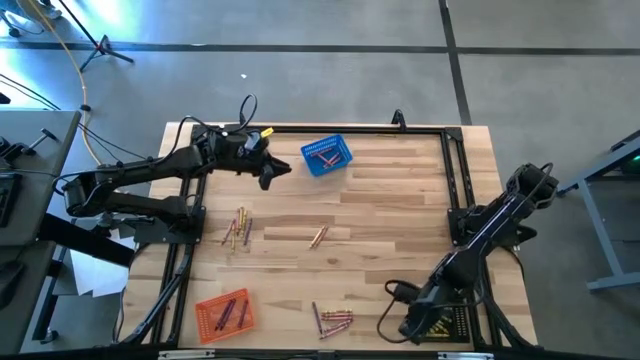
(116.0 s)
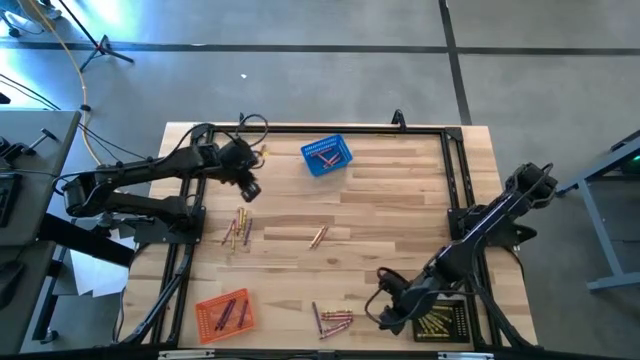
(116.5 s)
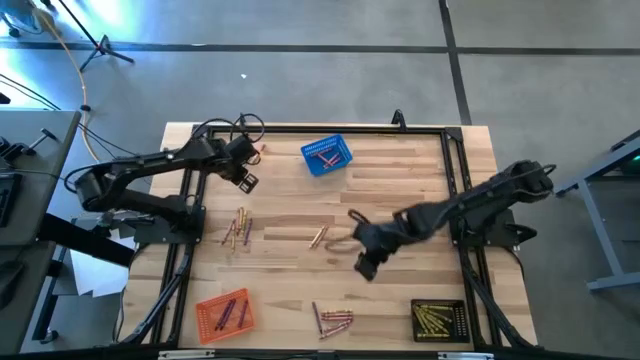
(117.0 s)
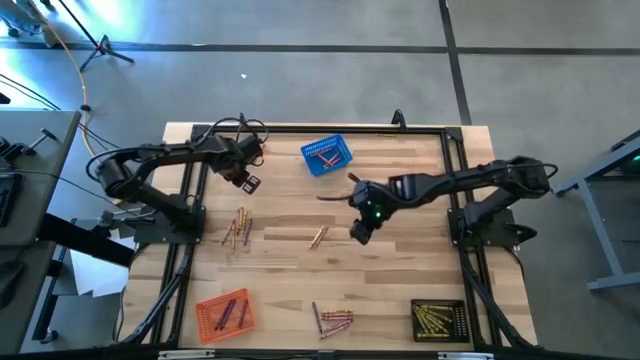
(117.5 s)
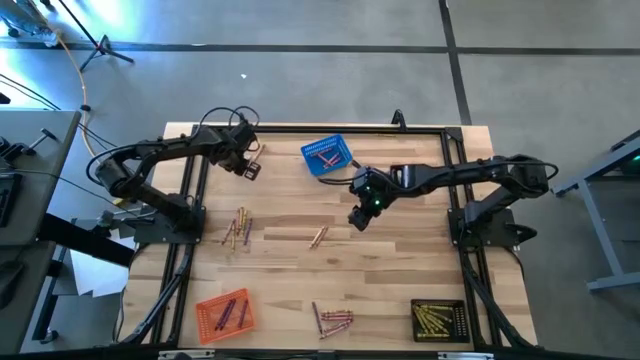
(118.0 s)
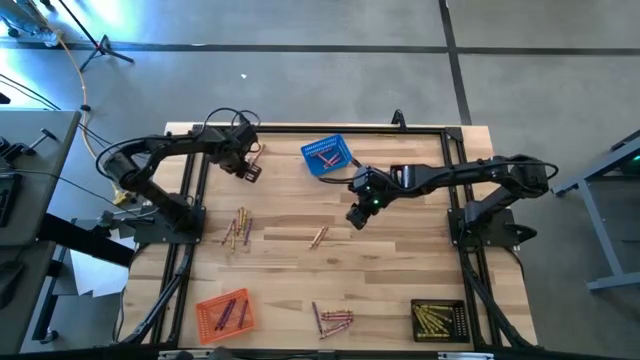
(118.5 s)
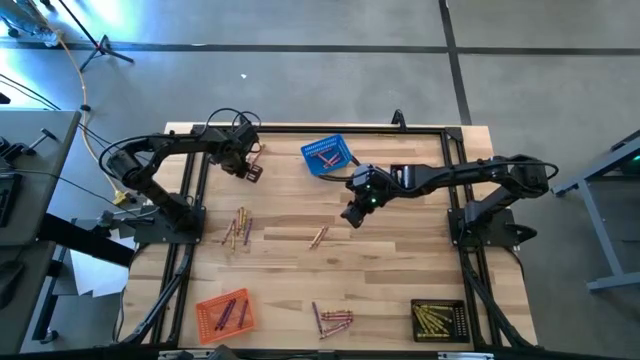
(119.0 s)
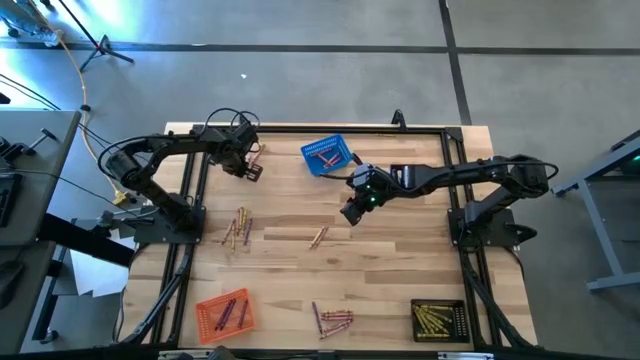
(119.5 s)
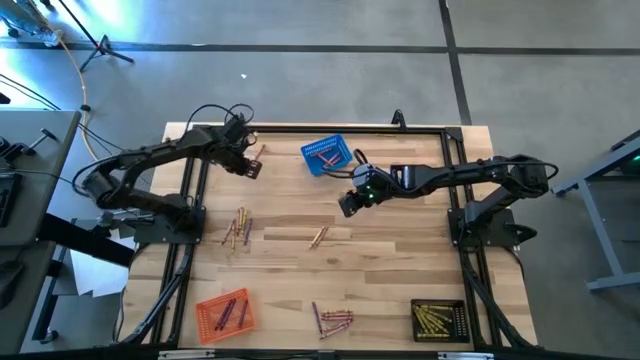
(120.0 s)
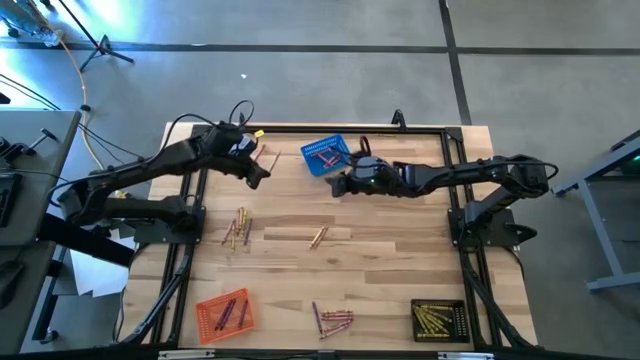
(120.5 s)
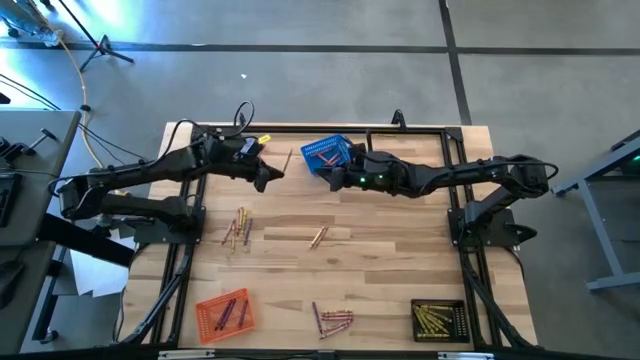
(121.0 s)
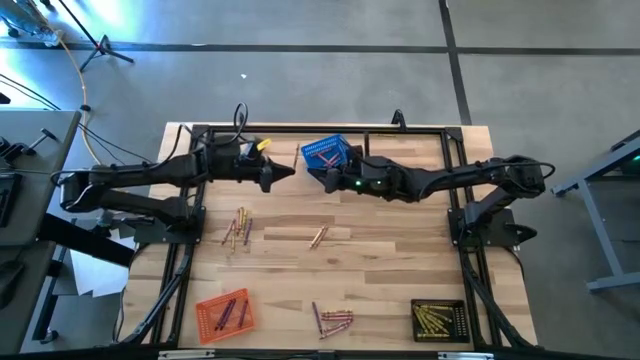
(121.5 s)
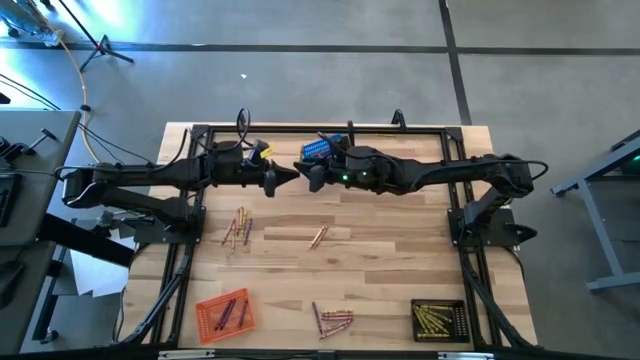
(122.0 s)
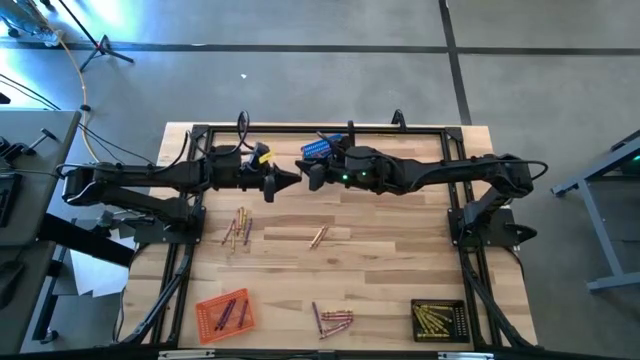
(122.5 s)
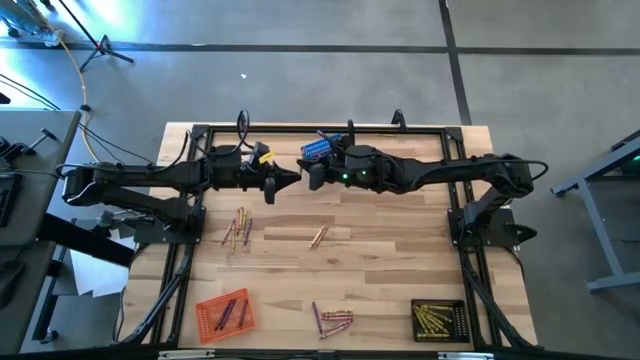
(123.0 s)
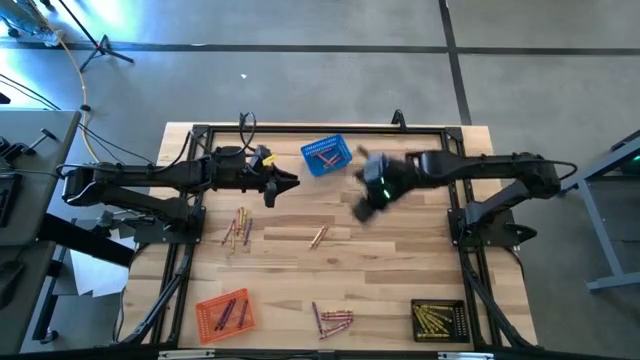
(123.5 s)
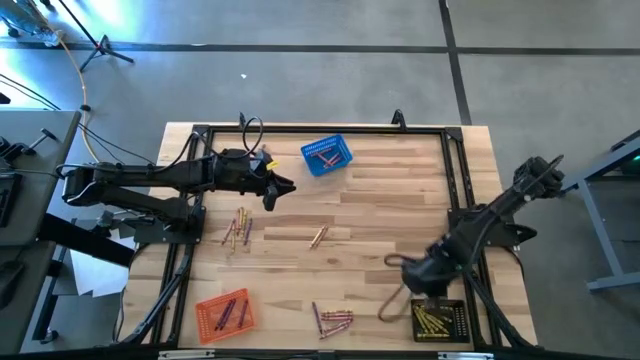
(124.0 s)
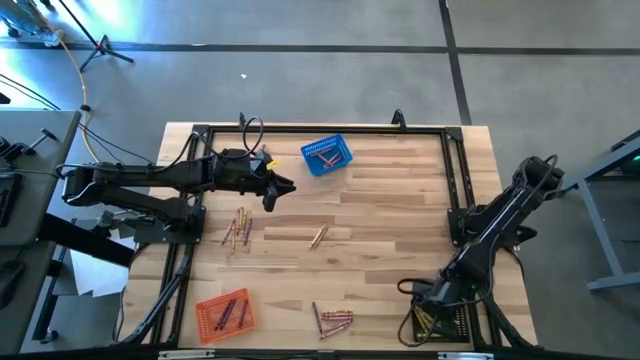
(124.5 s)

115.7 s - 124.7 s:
Task: Sort crayons
Put the yellow crayon into the black bin

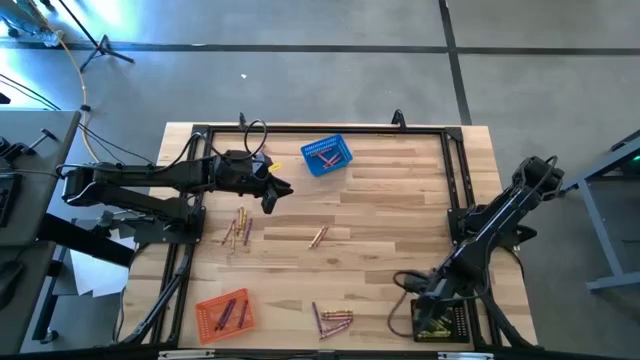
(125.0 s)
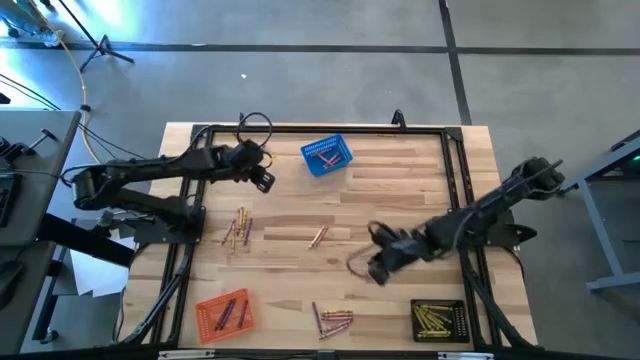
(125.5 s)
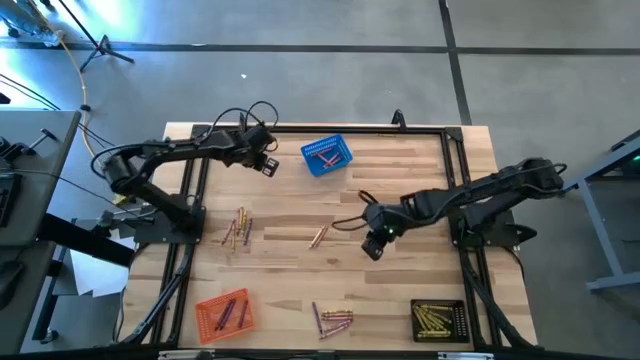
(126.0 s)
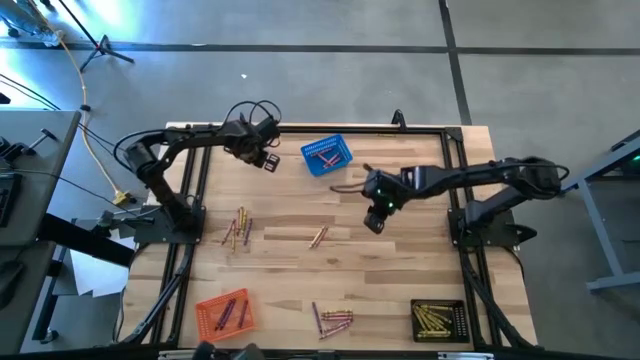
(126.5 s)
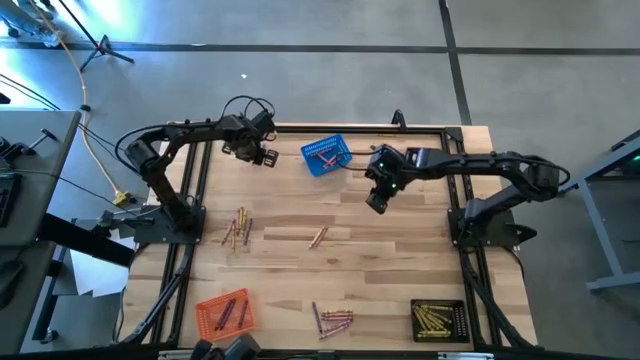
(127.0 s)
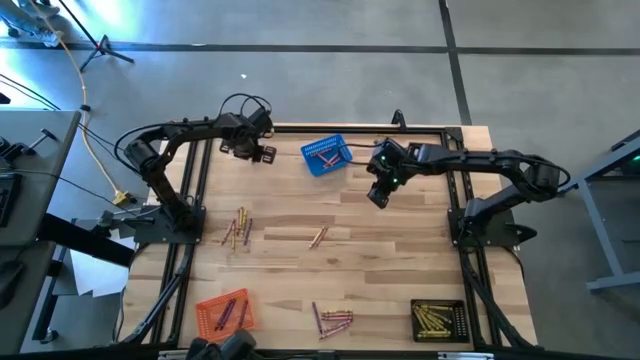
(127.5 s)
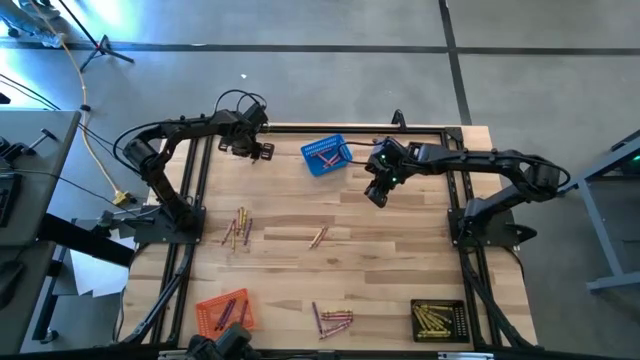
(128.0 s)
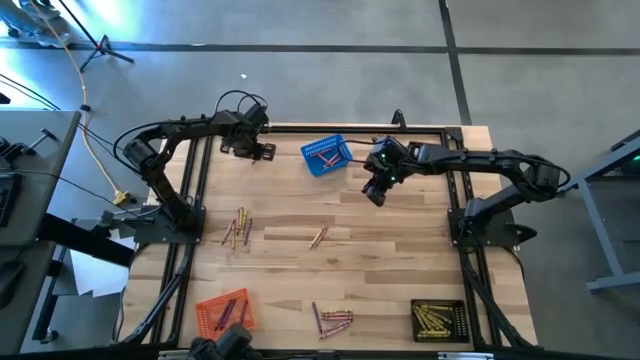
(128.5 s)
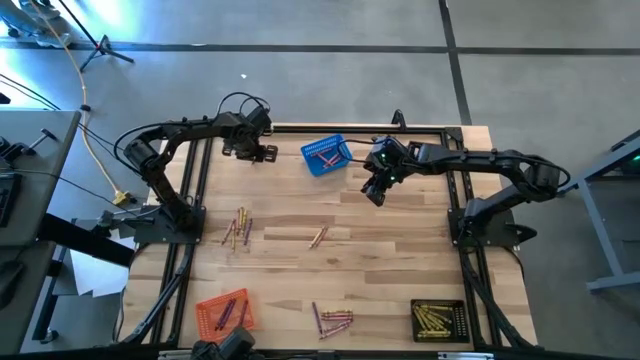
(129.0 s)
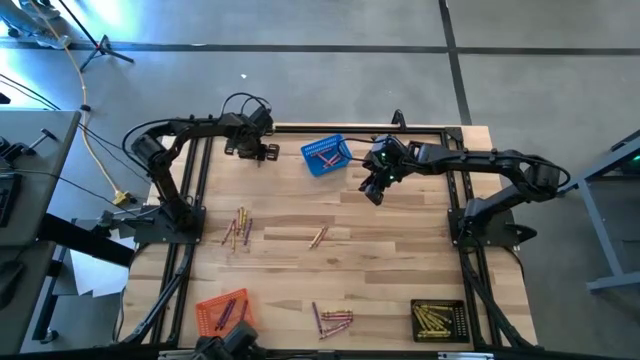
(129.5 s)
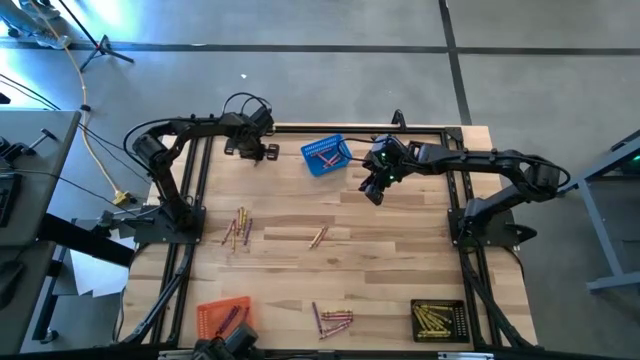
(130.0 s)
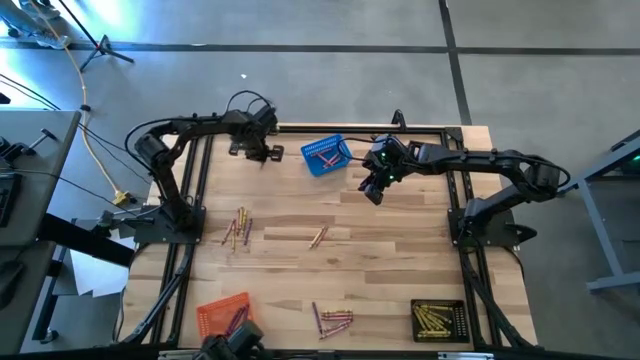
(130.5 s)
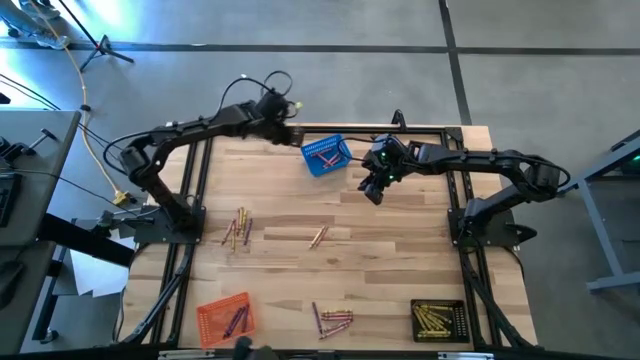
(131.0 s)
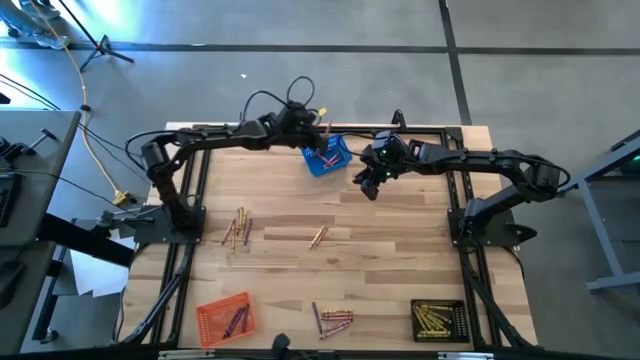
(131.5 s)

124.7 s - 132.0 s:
Put the red crayon into the blue bin

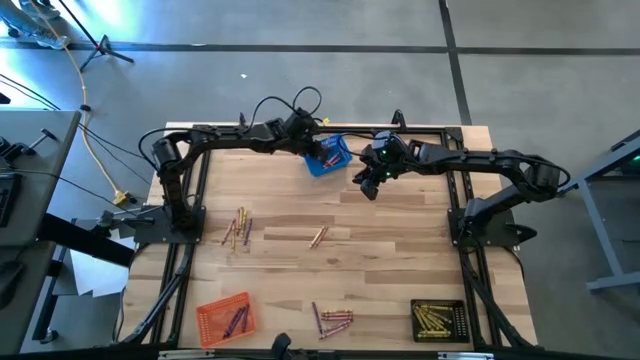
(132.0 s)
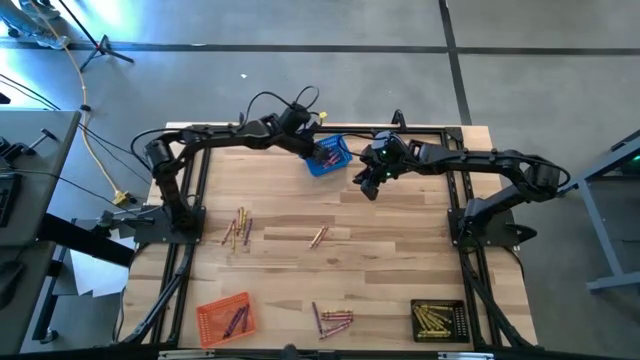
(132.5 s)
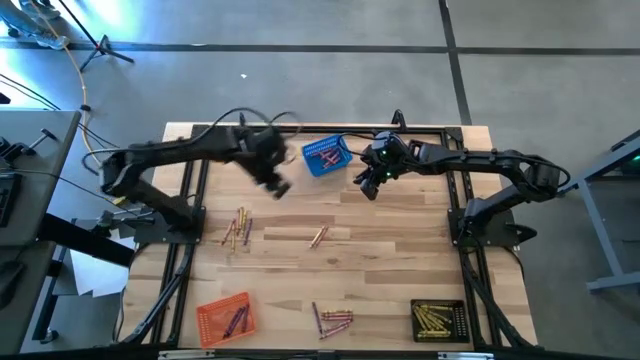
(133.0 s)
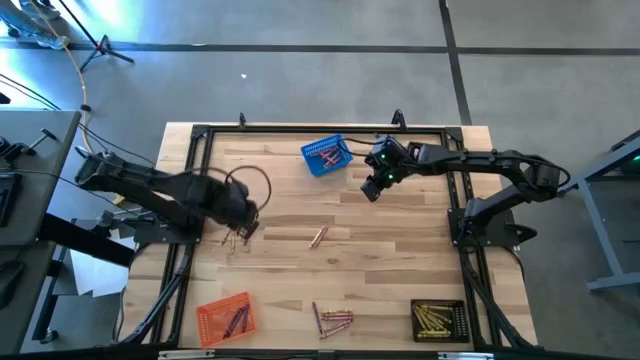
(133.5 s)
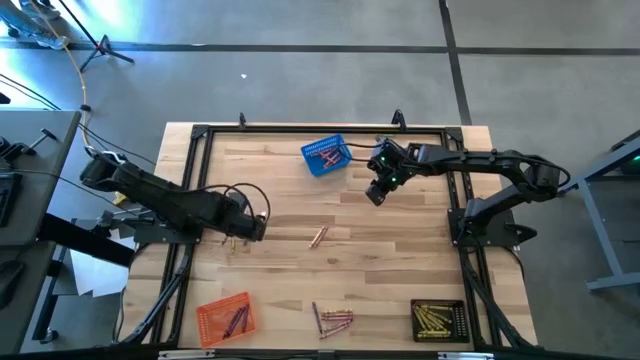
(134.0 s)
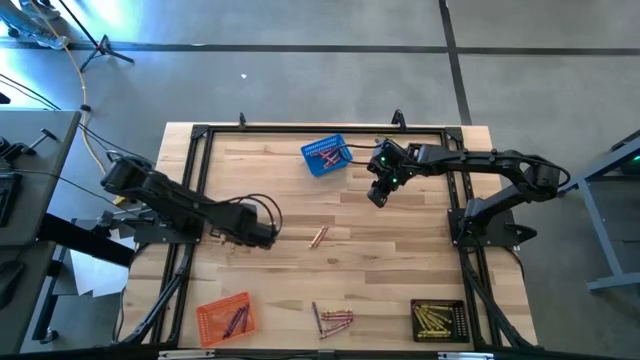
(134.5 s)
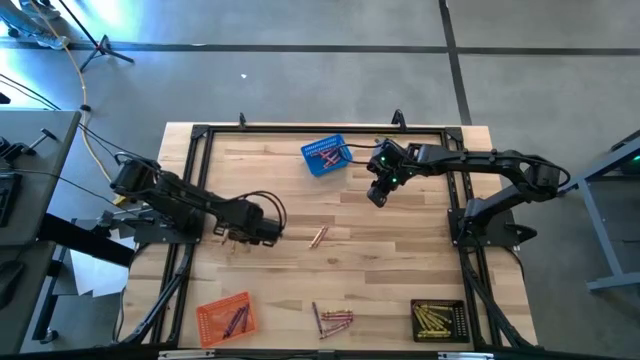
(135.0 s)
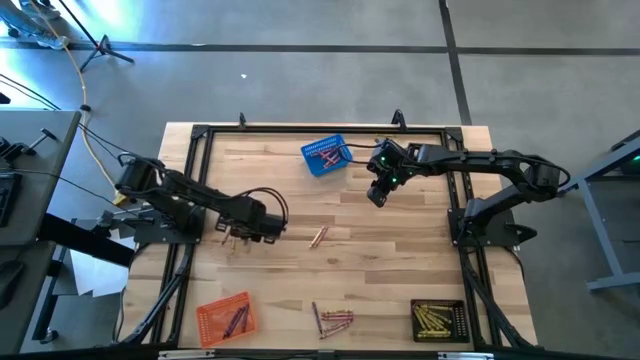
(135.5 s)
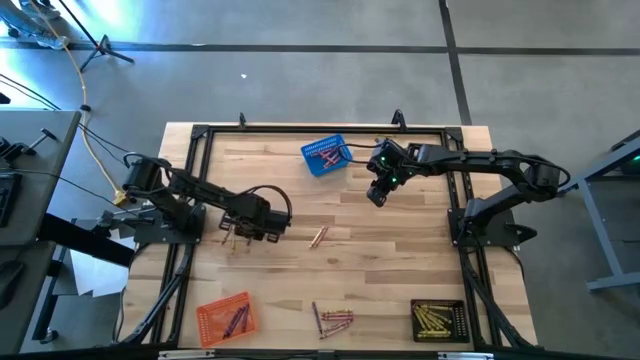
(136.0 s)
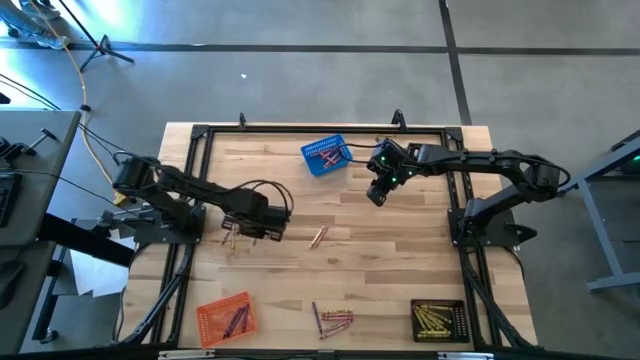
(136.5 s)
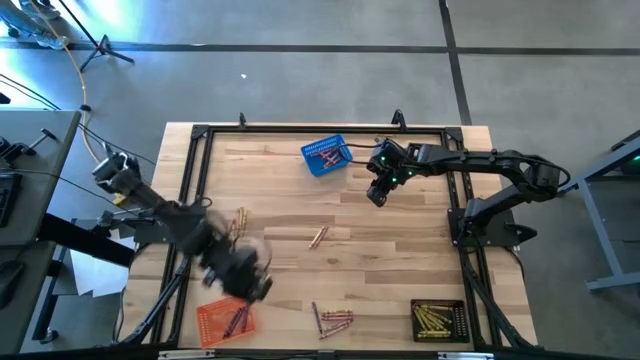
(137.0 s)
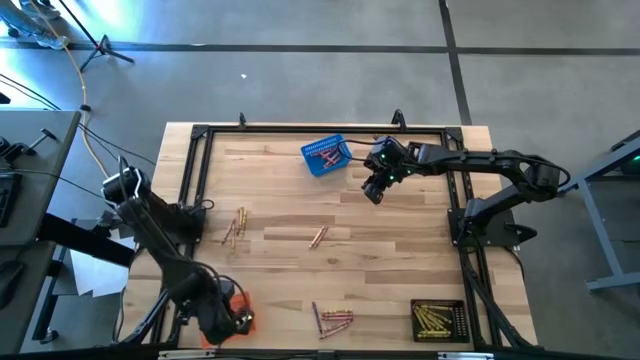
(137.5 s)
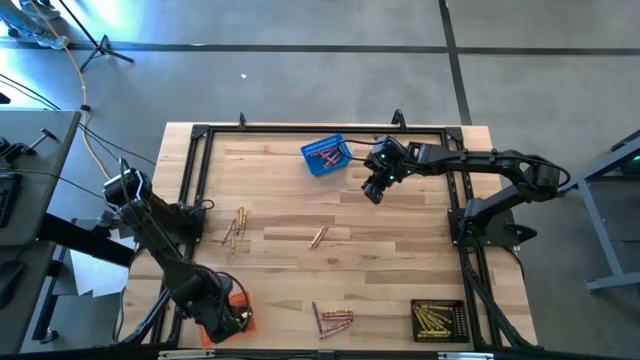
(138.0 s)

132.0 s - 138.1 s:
Put the purple crayon into the orange bin
